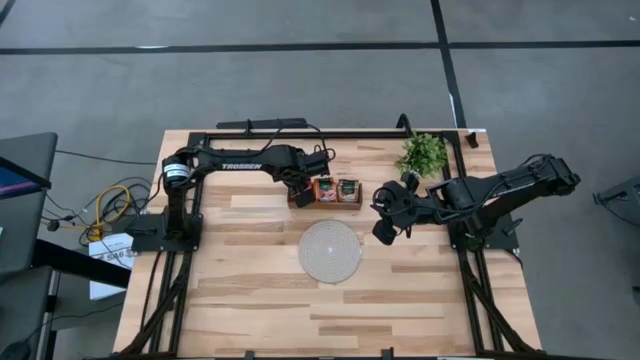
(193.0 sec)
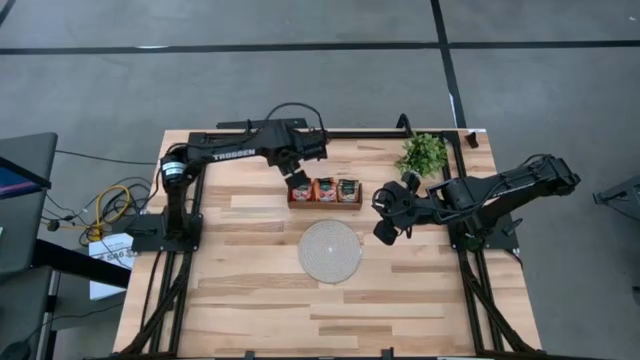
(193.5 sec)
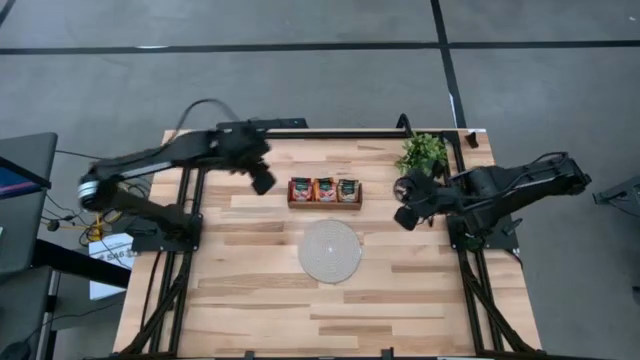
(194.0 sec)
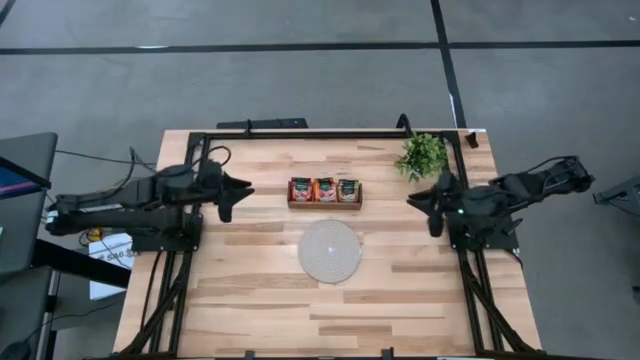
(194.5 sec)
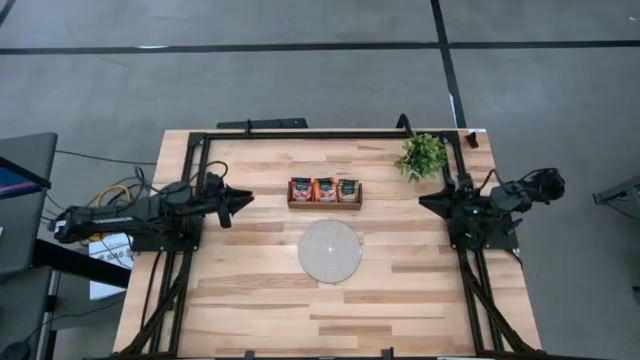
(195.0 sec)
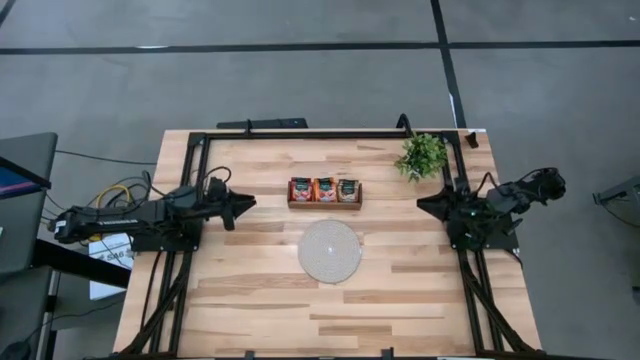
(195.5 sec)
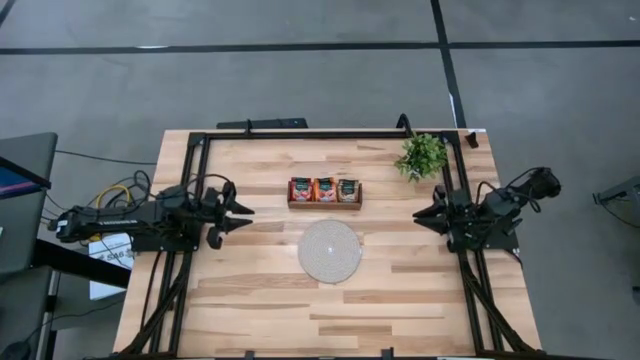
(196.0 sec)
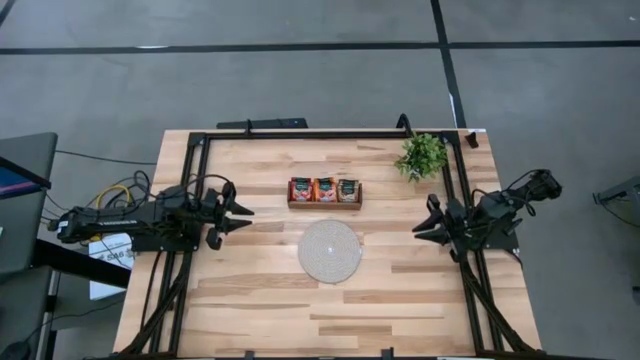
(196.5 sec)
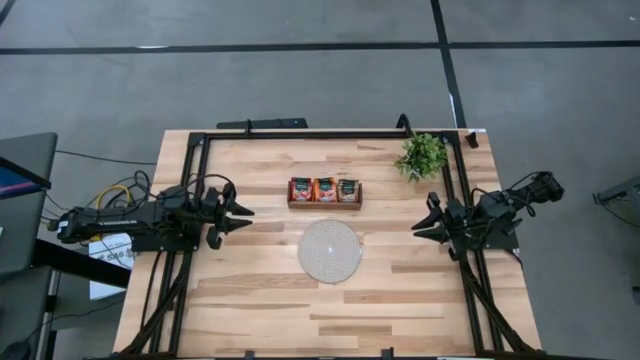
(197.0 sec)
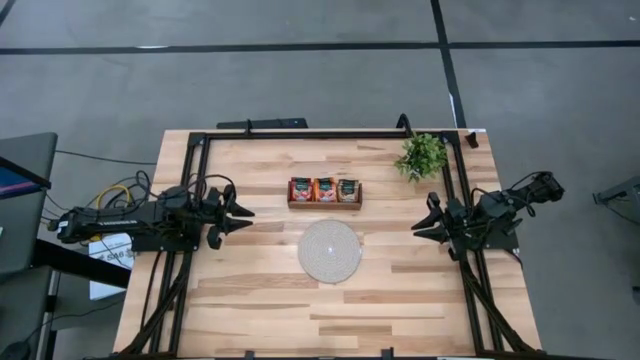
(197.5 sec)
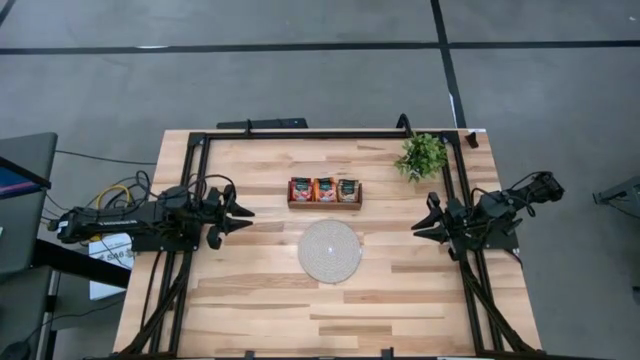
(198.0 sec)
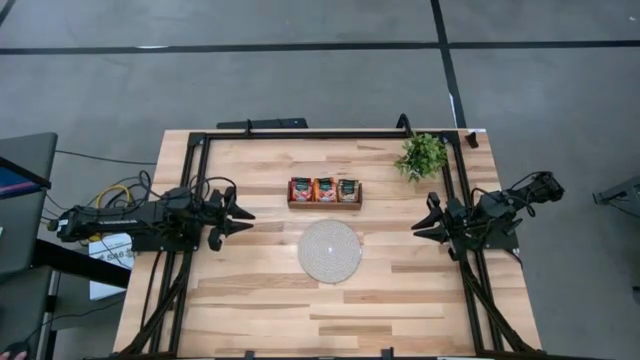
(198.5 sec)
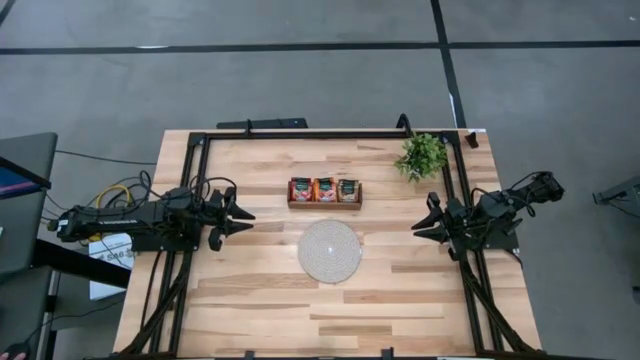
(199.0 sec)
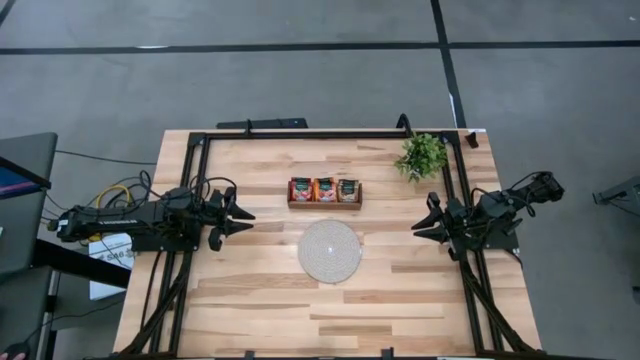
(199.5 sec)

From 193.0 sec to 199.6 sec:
Task: Pick & Place Tea
Return to Home Position

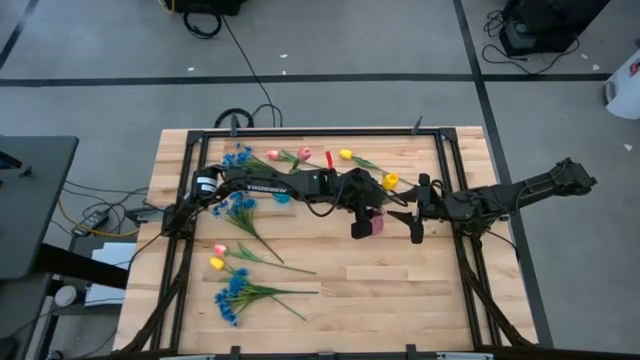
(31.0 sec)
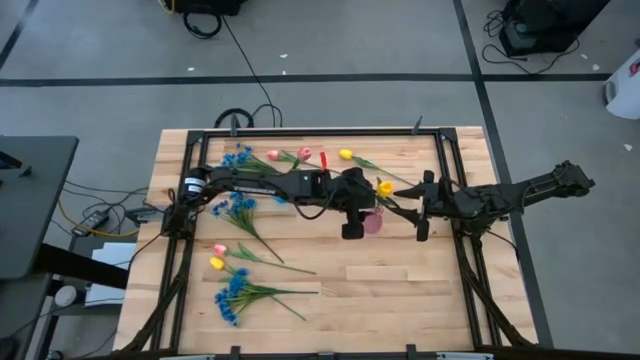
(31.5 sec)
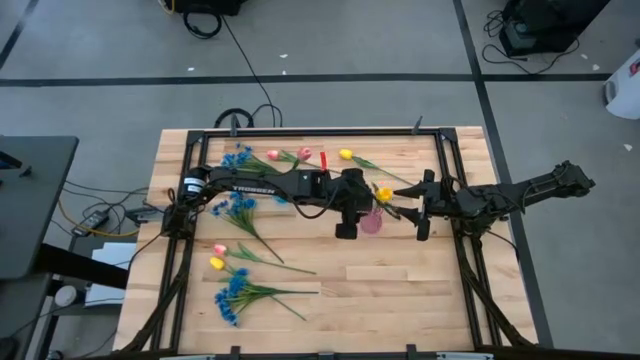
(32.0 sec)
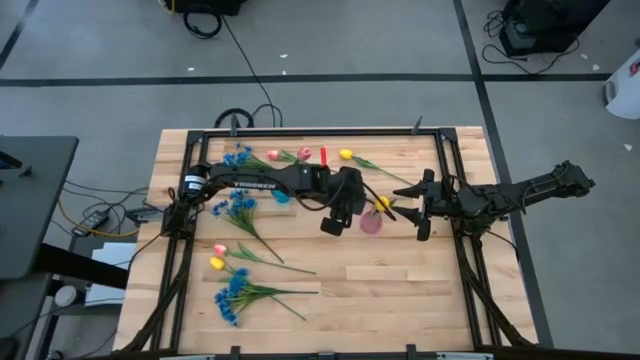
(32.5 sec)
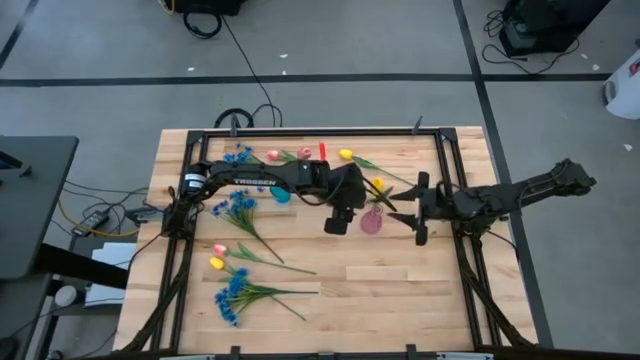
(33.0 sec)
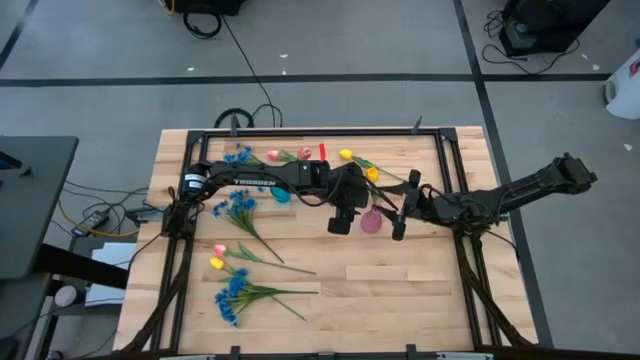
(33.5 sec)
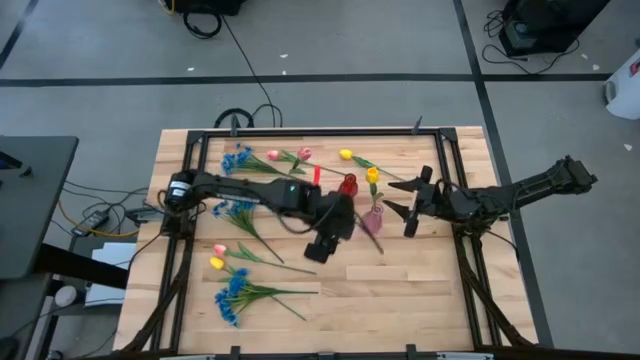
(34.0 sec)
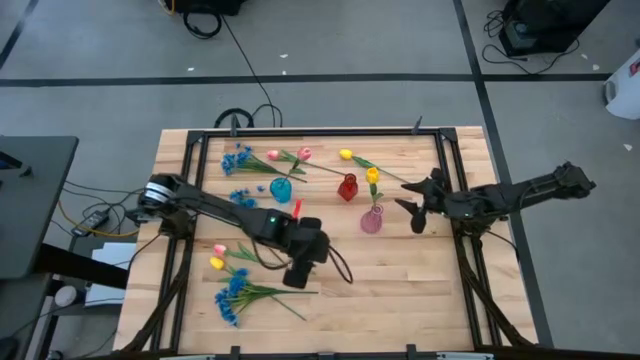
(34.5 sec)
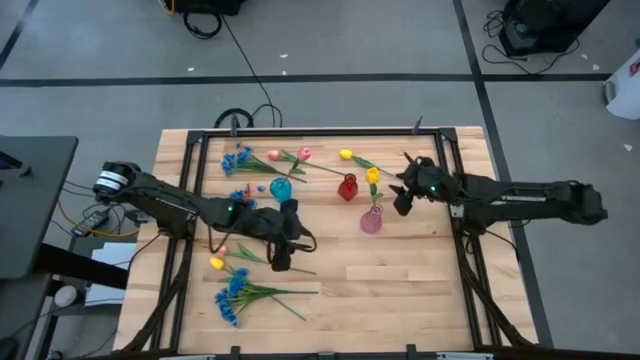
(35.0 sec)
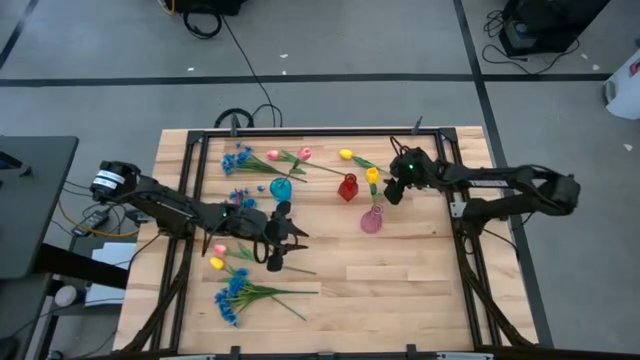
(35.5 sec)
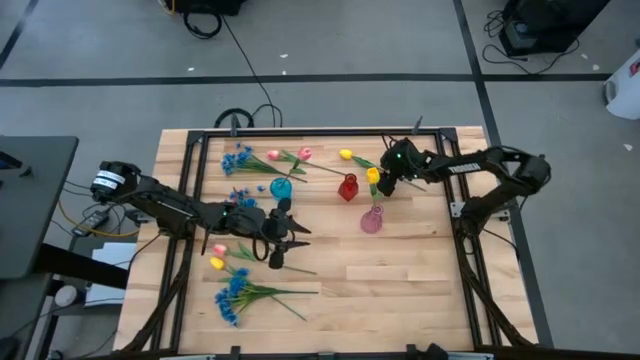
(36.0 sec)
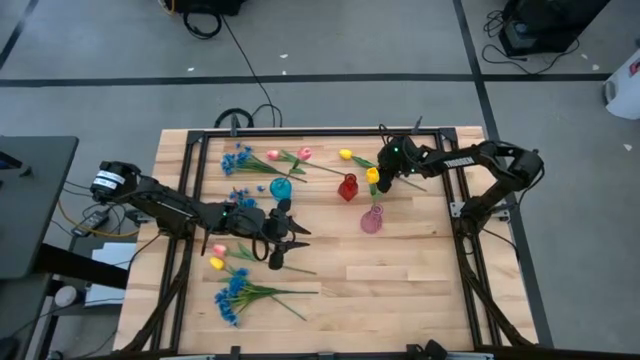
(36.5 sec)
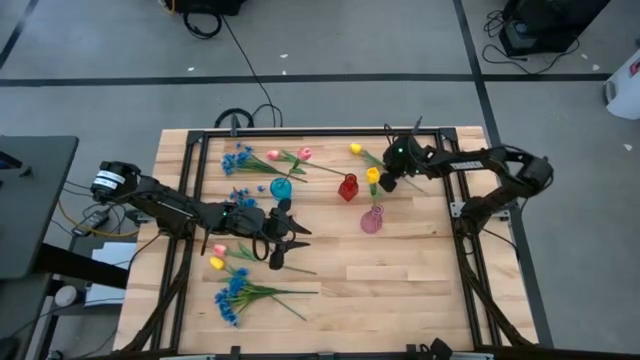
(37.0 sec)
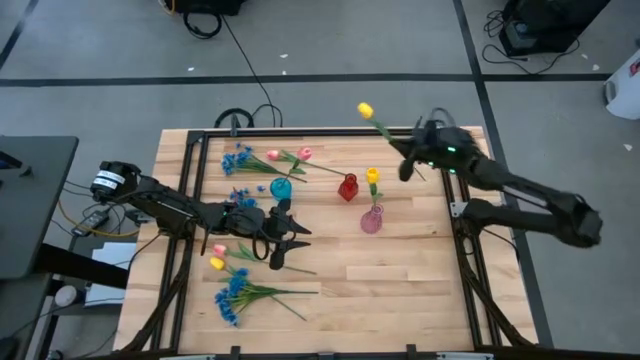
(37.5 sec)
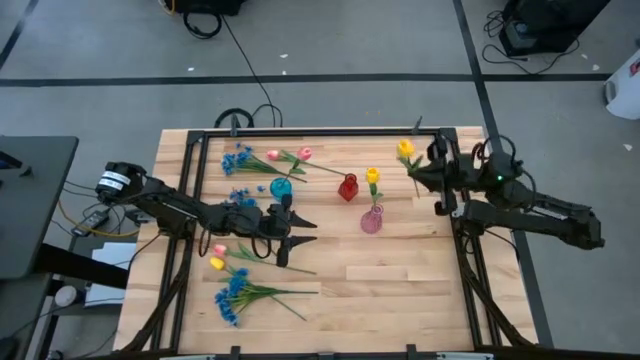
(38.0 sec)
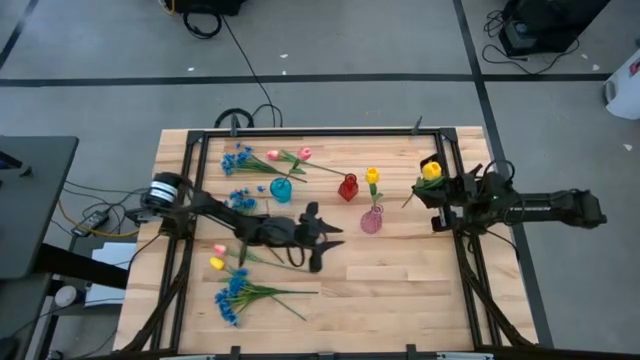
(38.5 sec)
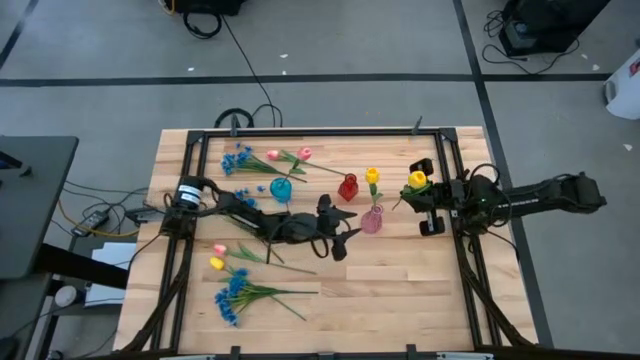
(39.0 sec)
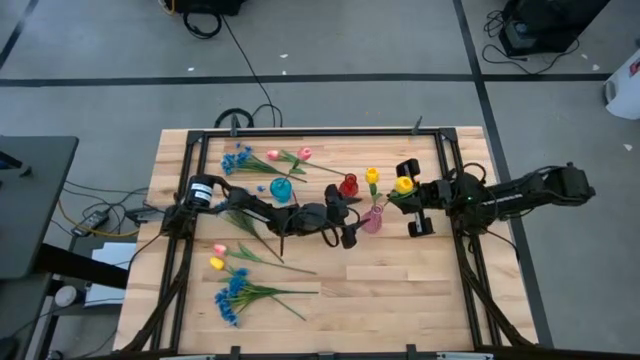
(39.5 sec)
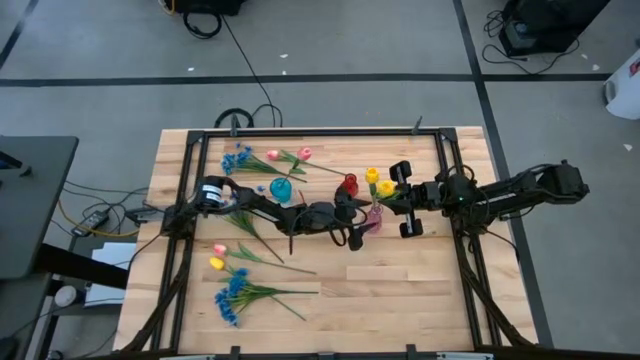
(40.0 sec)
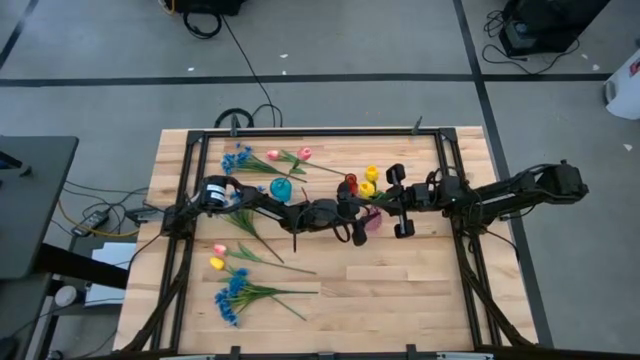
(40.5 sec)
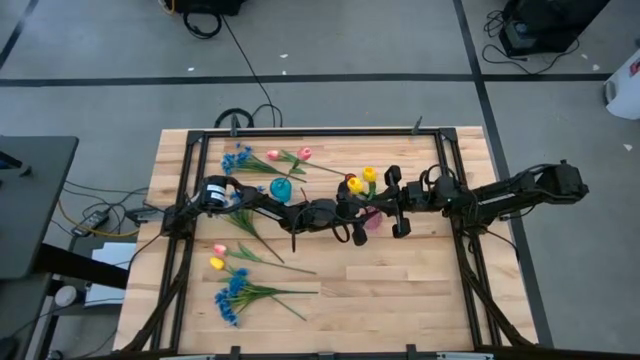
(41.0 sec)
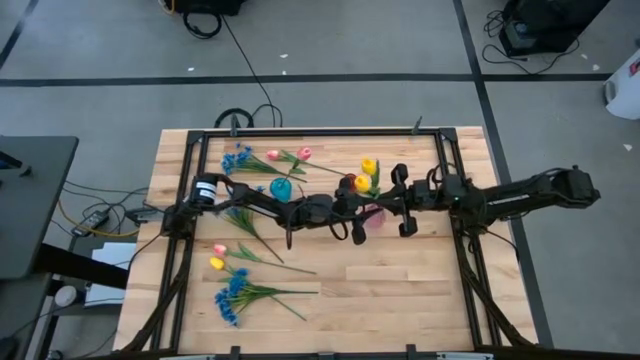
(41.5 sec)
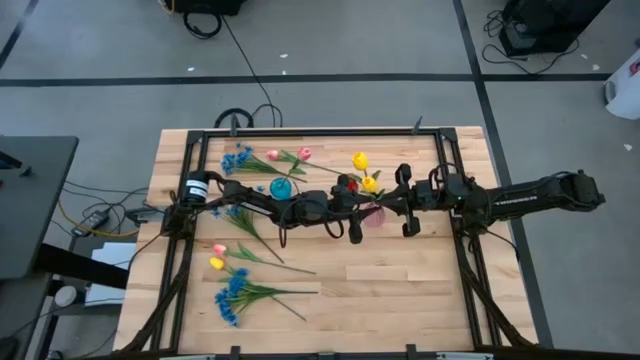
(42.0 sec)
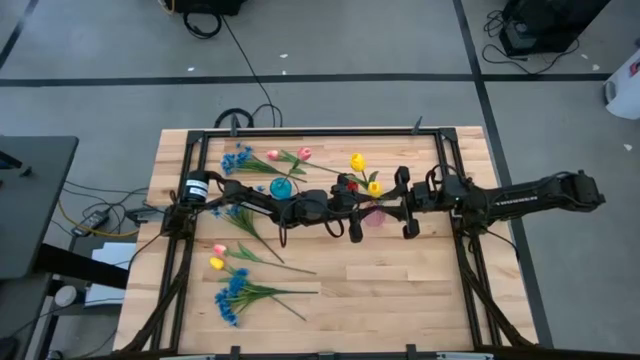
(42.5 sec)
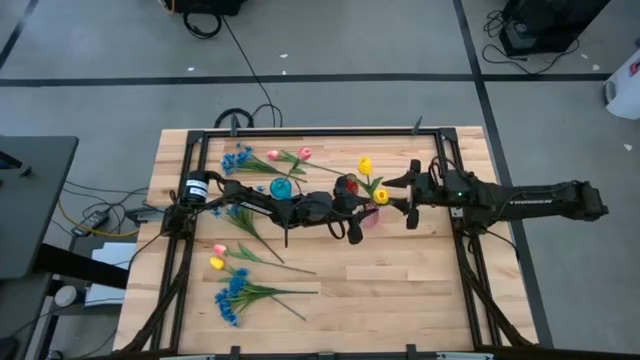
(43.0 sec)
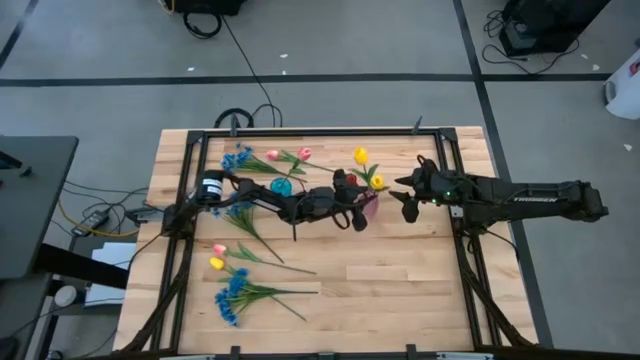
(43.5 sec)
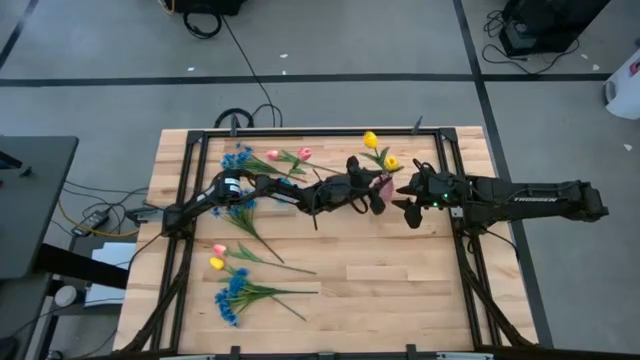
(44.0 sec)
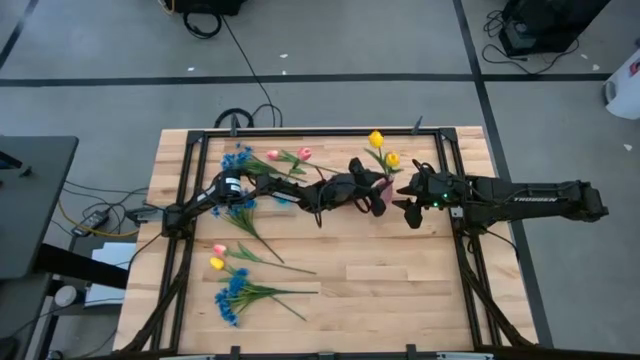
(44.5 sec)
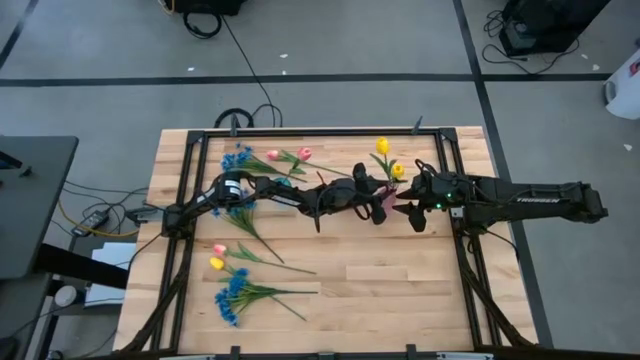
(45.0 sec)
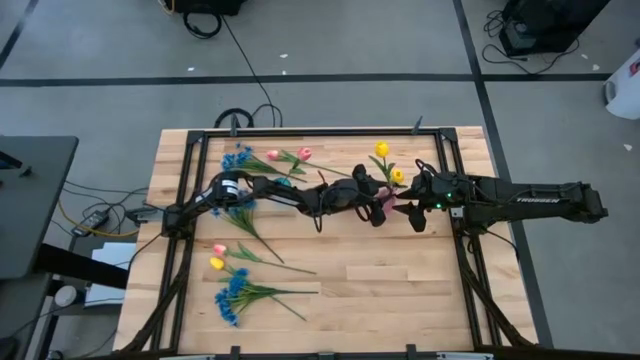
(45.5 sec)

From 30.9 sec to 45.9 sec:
Task: Sort flowers into vase by color
Put the top yellow flower into the pink vase
